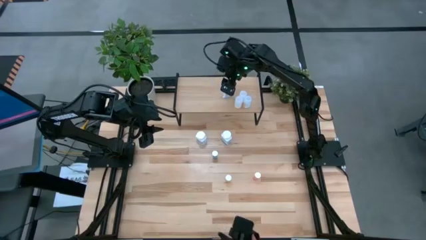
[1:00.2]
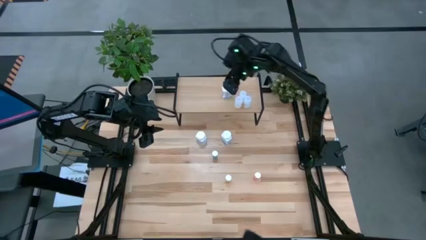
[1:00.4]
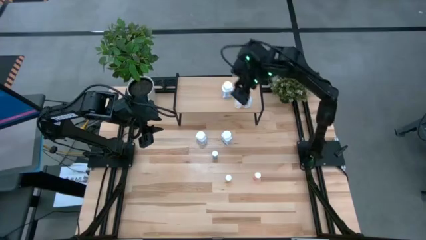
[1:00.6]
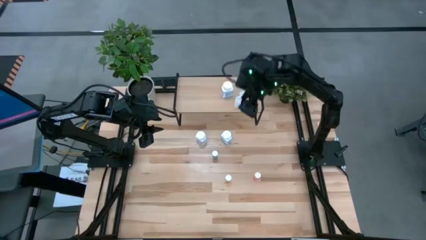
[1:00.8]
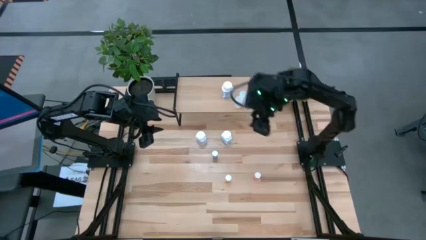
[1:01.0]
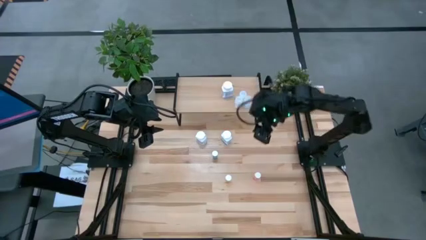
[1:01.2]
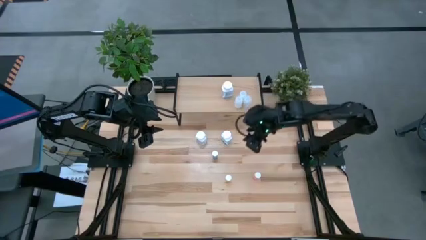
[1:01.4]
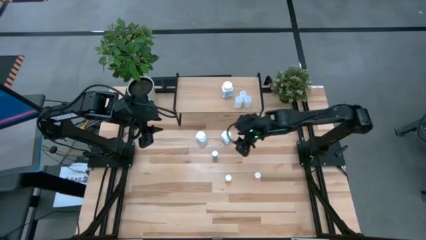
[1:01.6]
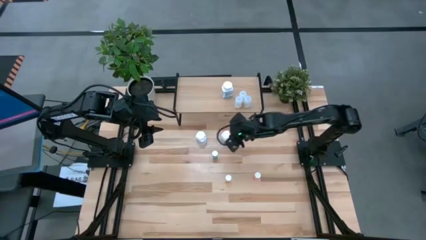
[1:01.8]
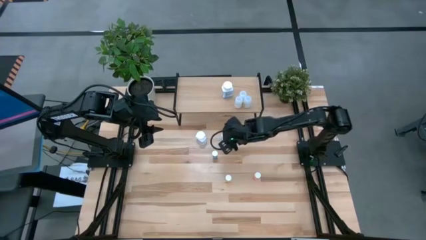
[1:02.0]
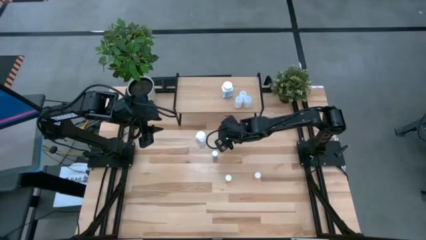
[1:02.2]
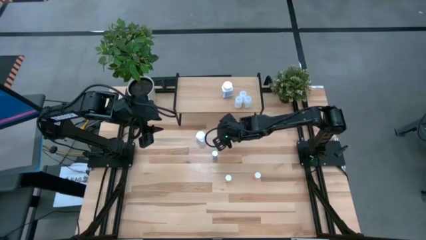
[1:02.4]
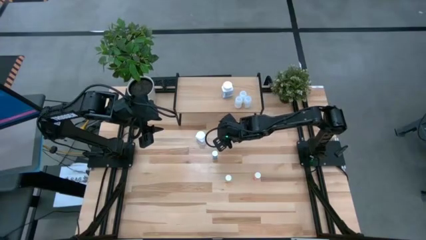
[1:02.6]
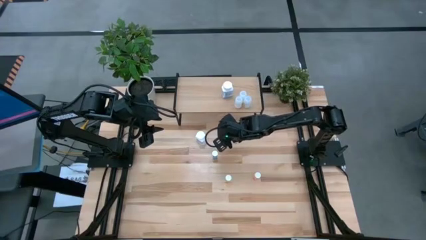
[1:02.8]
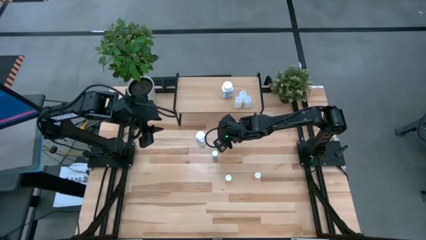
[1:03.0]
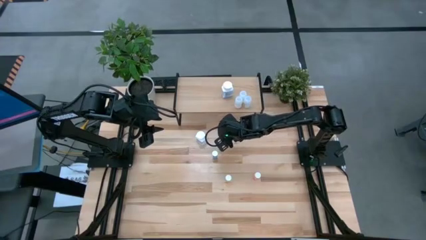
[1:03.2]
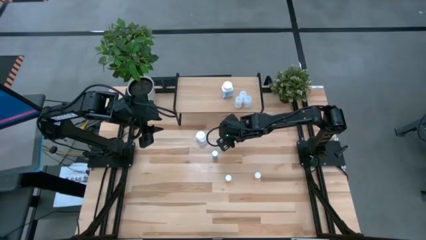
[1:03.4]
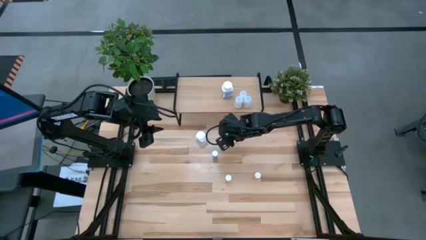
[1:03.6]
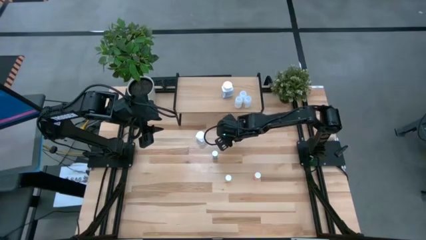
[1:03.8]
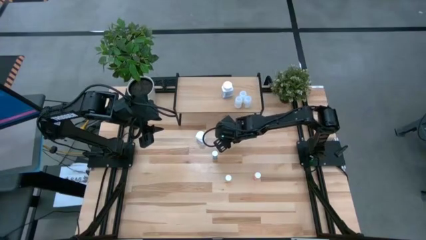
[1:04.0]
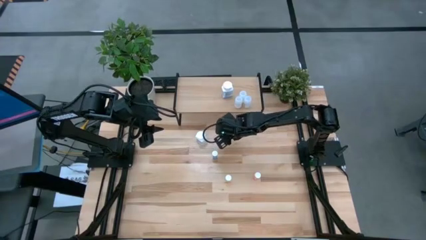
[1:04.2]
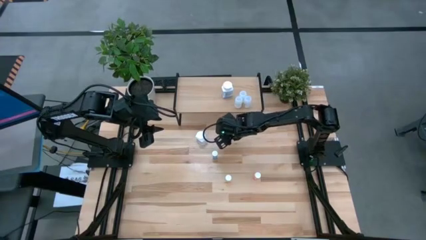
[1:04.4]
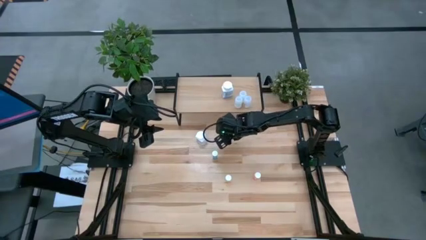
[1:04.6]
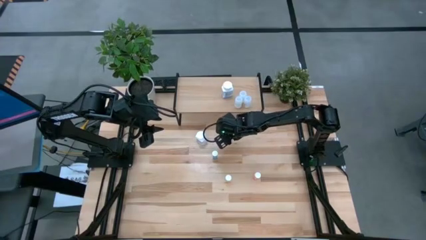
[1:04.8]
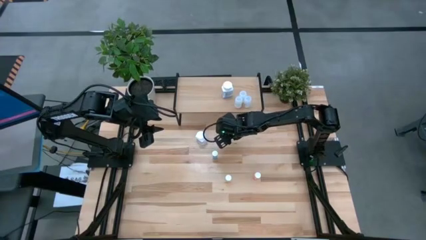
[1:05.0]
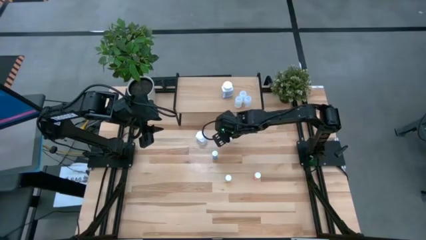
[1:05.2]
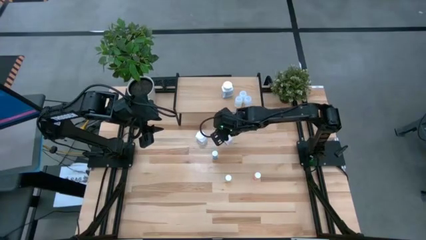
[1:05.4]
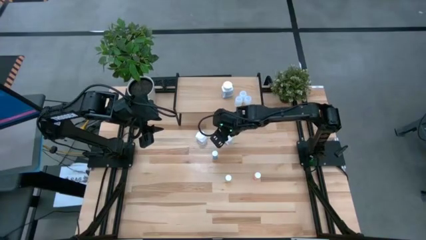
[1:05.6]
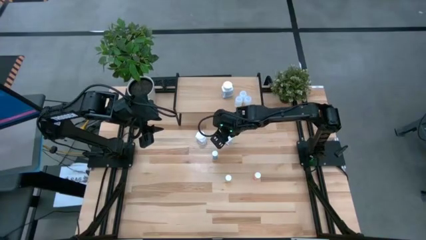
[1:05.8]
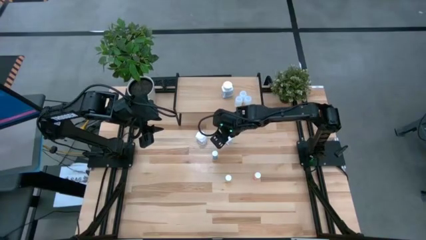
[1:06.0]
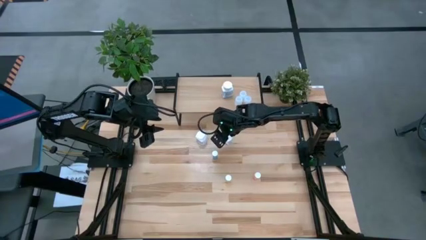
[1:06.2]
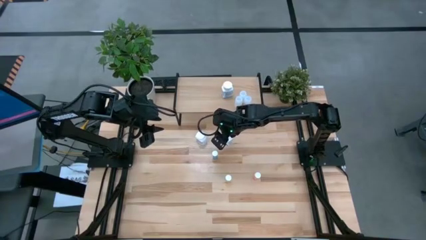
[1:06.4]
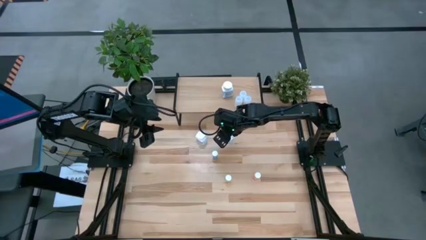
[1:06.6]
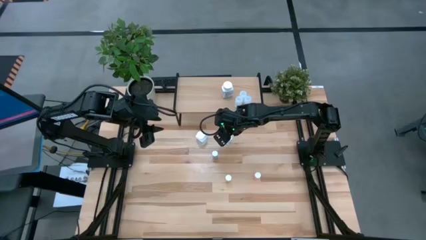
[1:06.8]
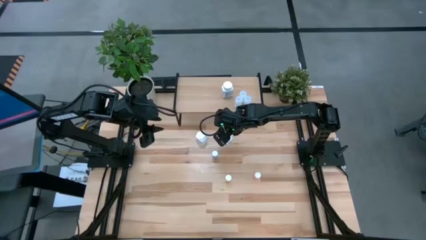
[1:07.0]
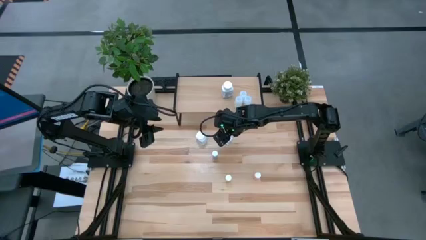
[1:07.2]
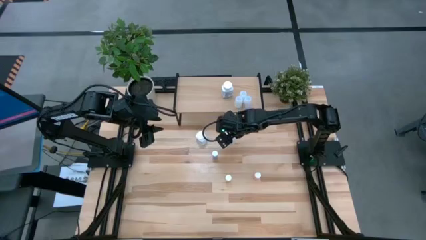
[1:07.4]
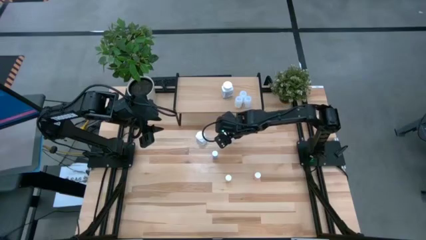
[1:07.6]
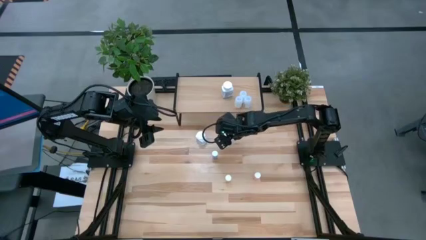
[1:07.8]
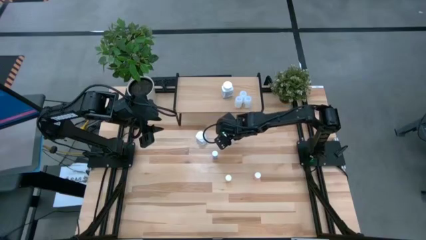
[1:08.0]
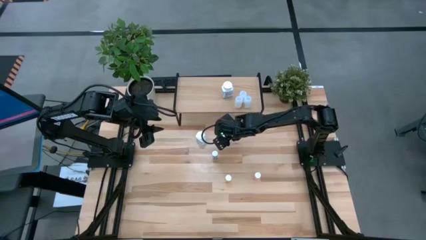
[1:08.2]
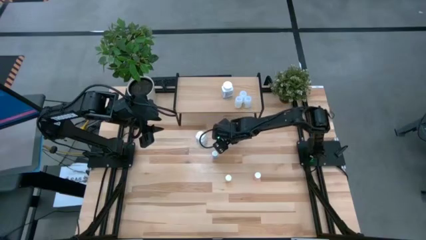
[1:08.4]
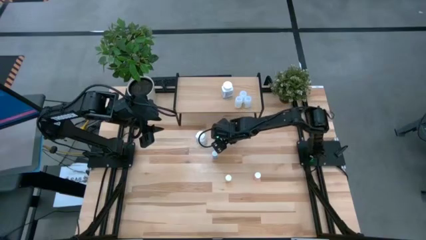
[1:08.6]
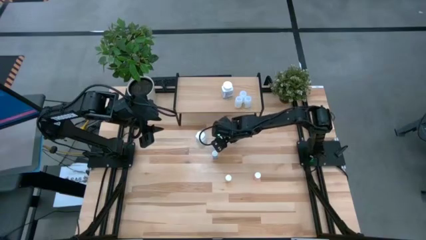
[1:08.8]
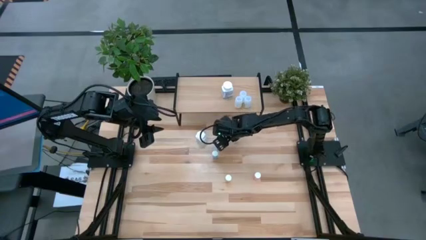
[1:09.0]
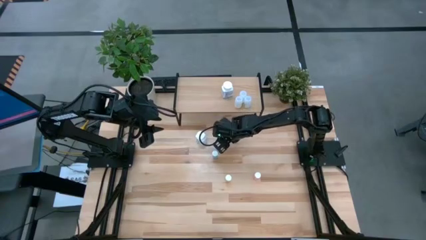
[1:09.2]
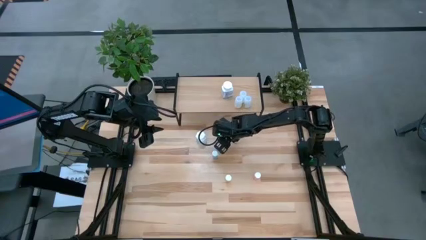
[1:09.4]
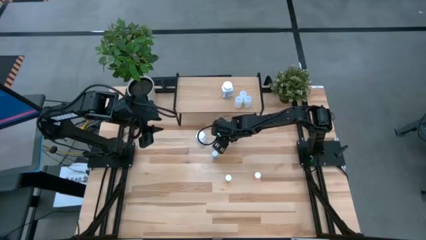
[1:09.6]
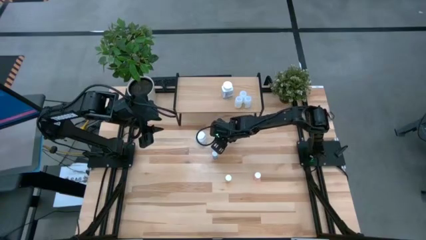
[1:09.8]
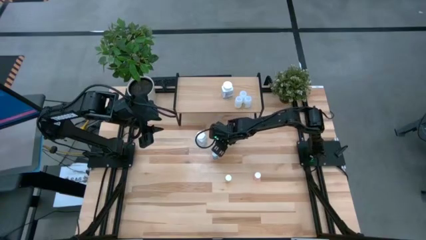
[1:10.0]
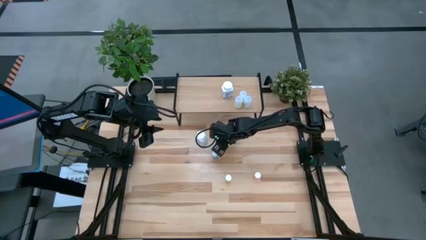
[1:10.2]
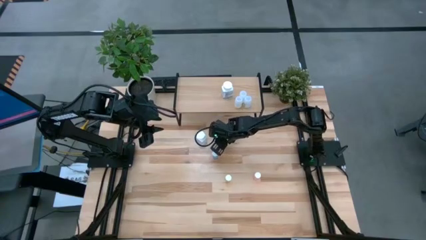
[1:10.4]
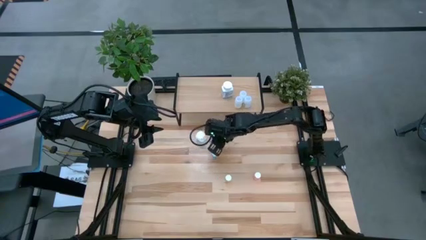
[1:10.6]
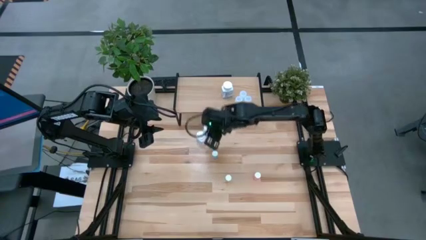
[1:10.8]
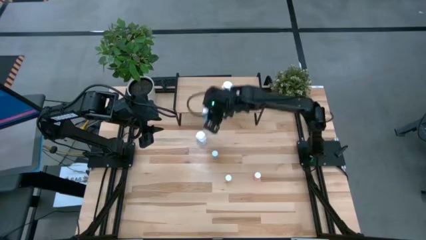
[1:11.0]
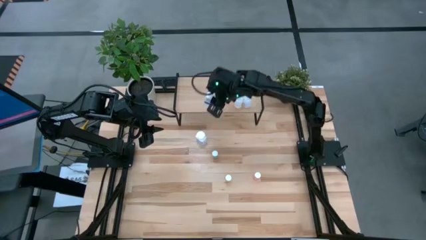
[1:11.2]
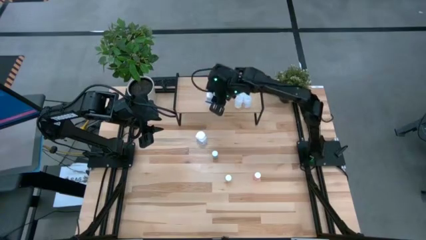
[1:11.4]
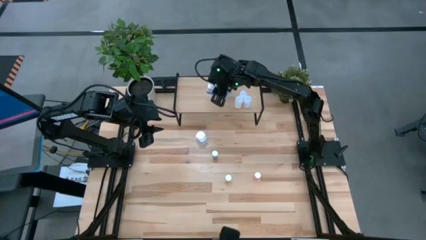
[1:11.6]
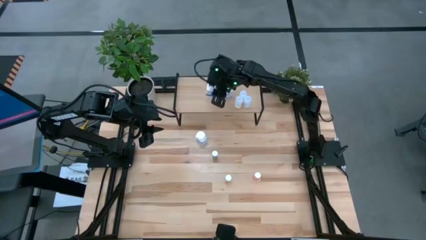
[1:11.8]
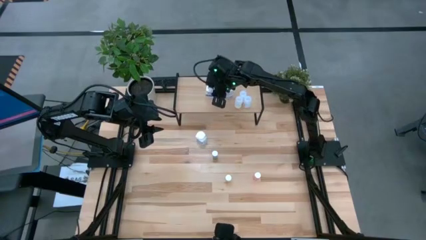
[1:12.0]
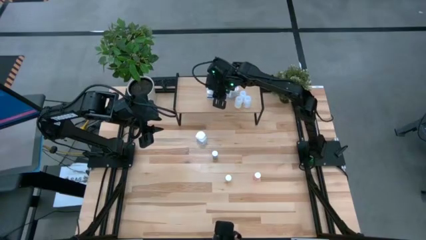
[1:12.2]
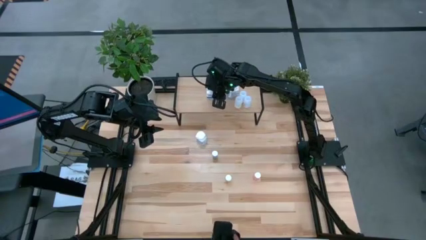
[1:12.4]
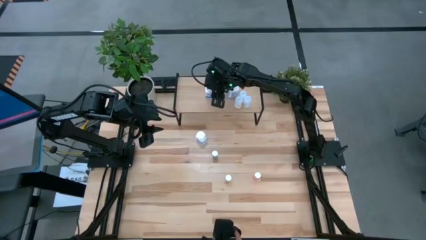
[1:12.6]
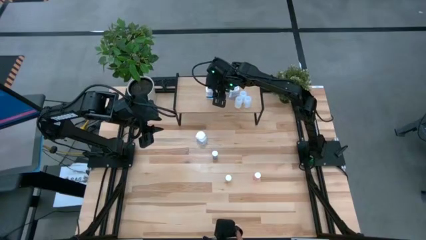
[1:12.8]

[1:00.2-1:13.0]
Task: Pick and place medicine bottles onto shelf by color
Put the right white blue pill bottle on the shelf

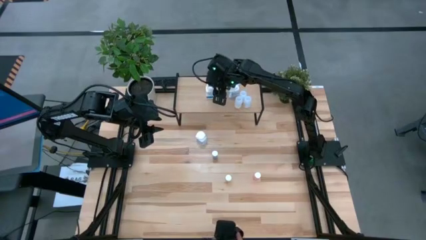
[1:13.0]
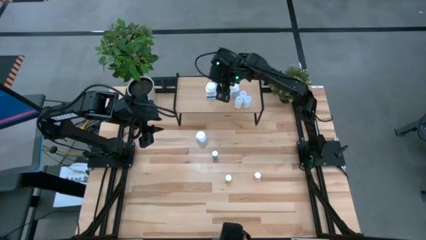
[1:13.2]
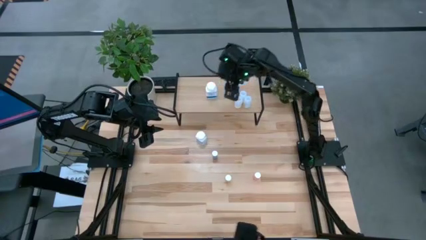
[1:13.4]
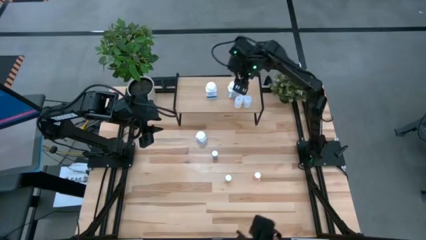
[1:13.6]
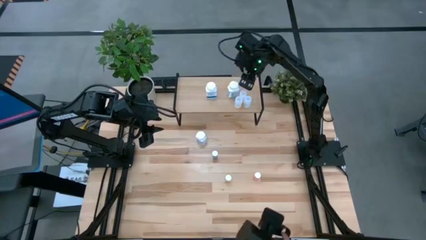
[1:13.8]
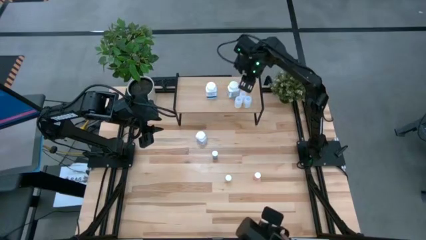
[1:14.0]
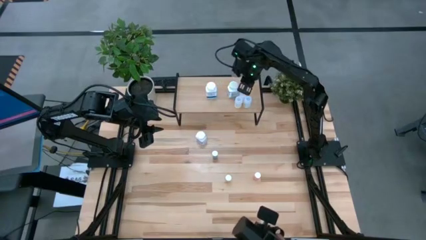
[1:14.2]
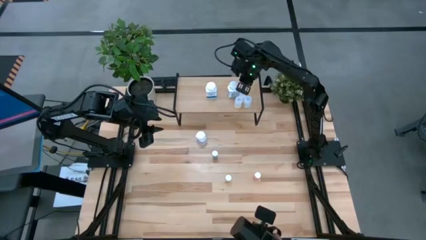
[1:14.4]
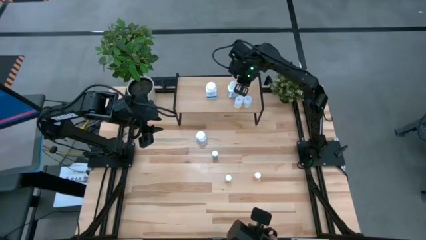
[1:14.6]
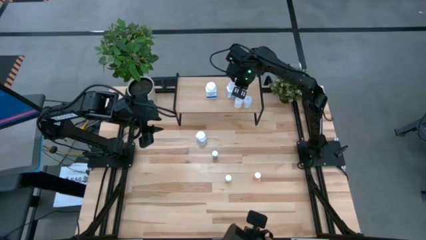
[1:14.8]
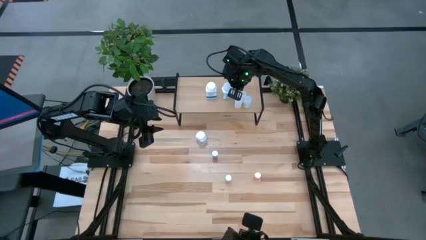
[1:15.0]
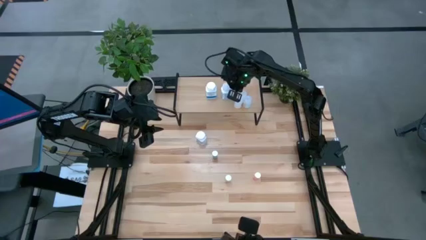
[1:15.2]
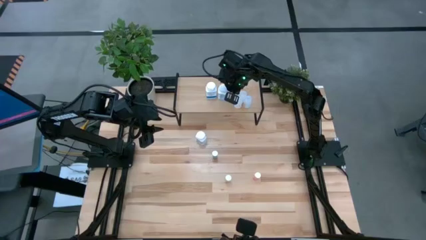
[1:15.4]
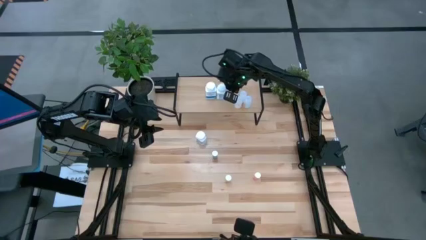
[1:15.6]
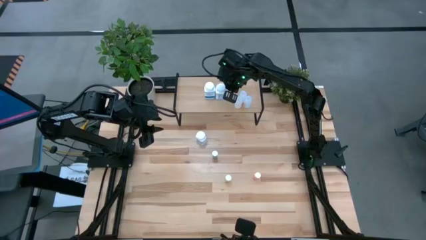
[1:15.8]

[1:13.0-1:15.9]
Adjust the right white blue pill bottle on the shelf

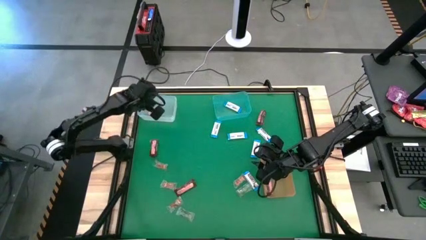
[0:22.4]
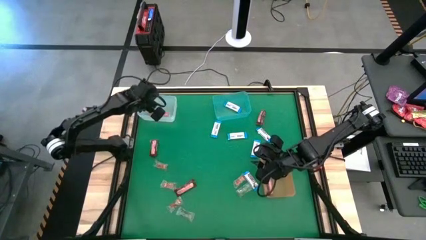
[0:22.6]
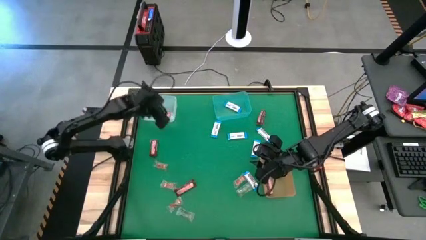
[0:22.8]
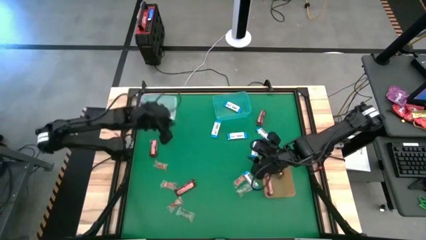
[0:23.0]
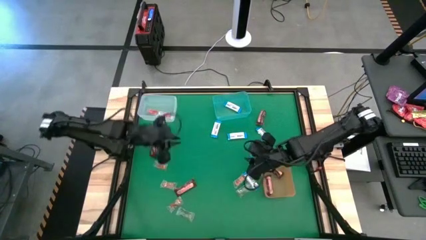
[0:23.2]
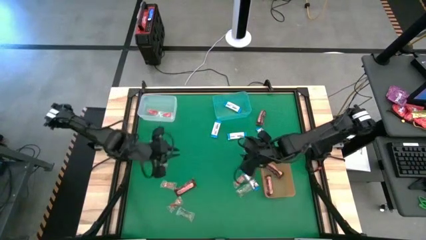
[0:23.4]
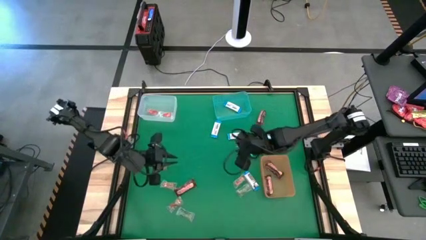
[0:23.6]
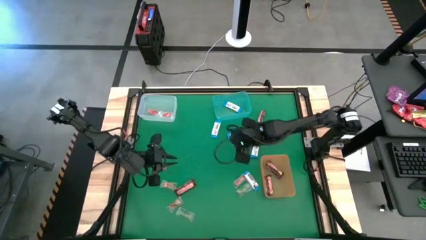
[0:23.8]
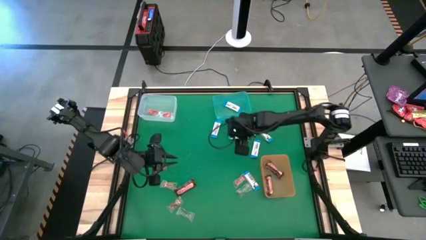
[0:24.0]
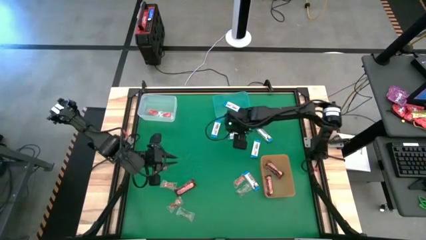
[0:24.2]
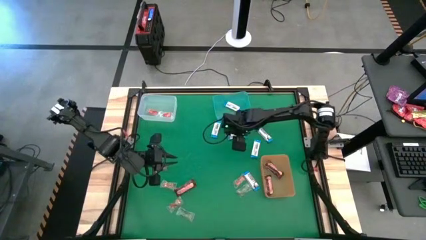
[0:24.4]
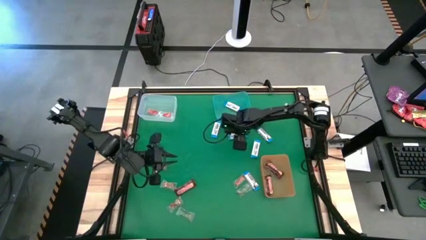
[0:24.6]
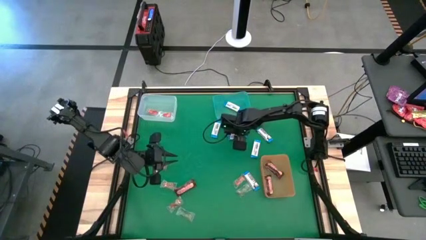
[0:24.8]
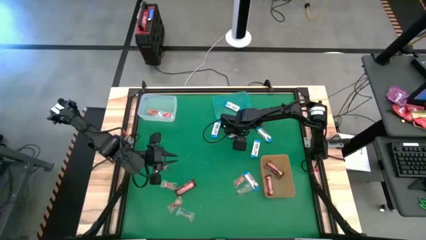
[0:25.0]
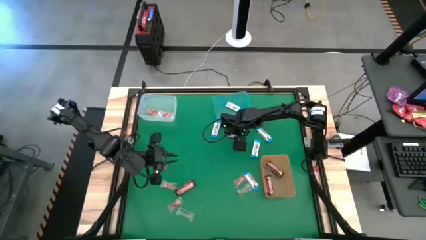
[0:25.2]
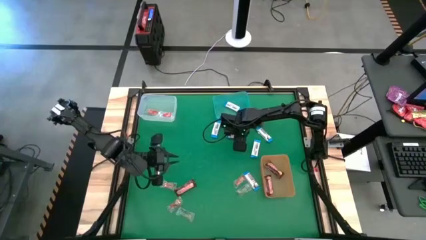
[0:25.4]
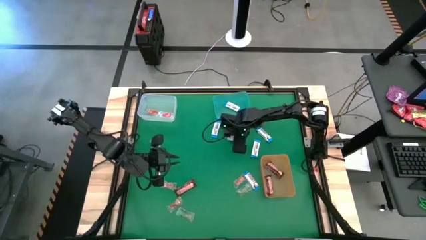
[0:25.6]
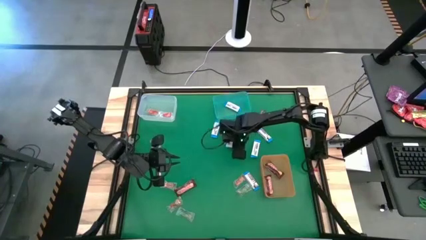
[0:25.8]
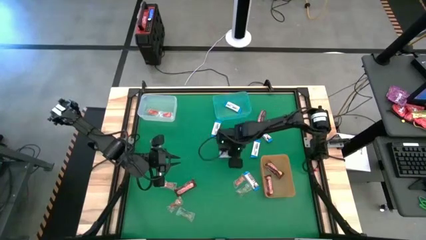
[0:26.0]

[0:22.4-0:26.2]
Task: Sort candy by brand, put in halloween buckets
Put the white chocolate into the light blue bin
